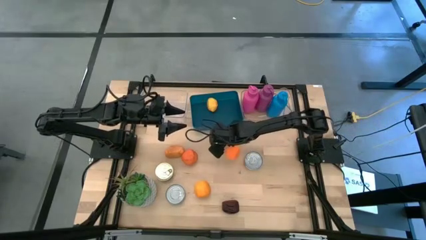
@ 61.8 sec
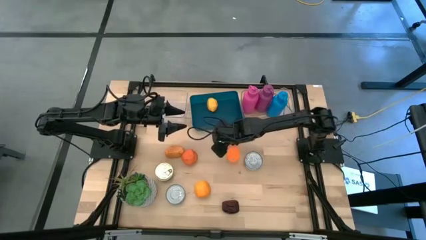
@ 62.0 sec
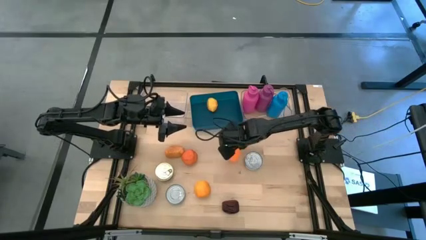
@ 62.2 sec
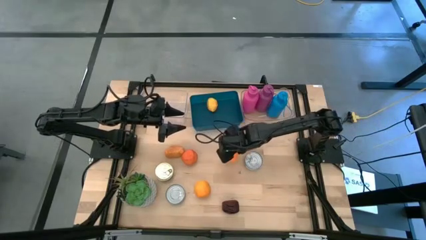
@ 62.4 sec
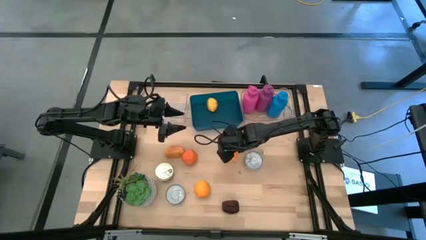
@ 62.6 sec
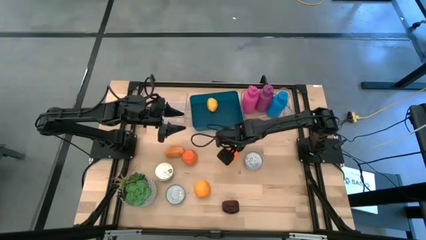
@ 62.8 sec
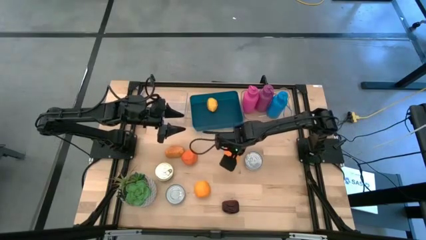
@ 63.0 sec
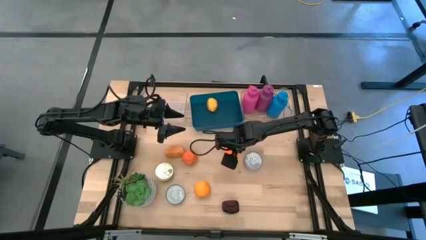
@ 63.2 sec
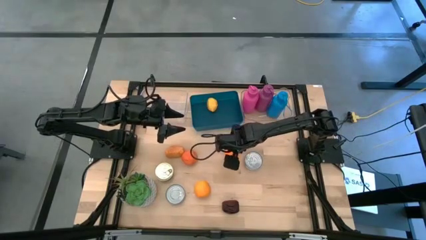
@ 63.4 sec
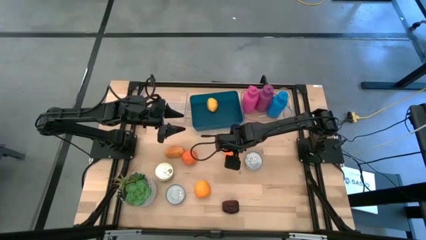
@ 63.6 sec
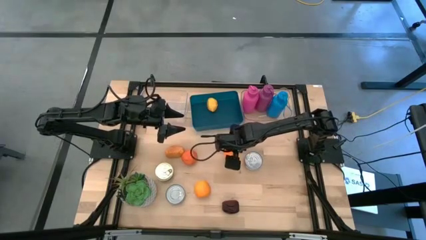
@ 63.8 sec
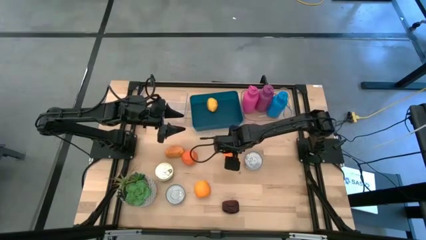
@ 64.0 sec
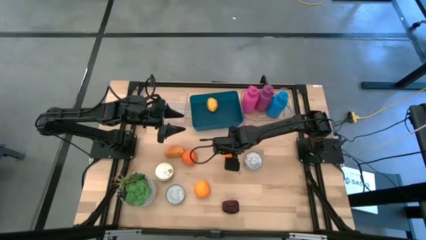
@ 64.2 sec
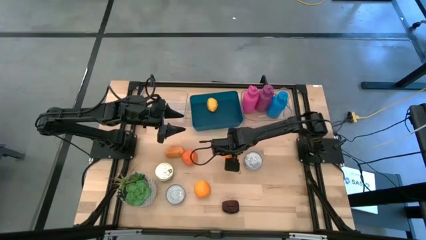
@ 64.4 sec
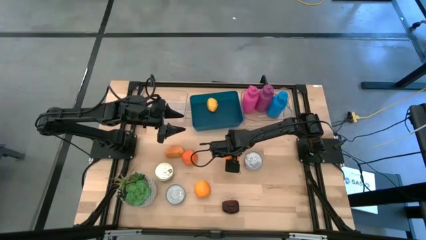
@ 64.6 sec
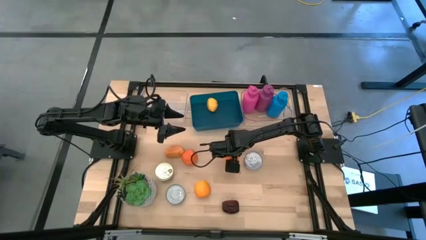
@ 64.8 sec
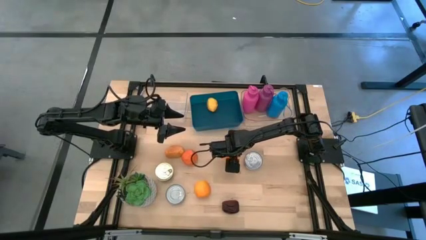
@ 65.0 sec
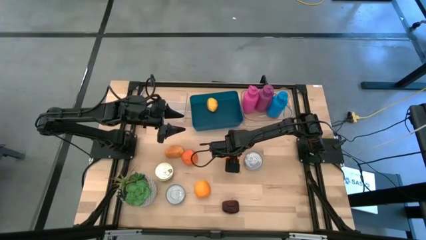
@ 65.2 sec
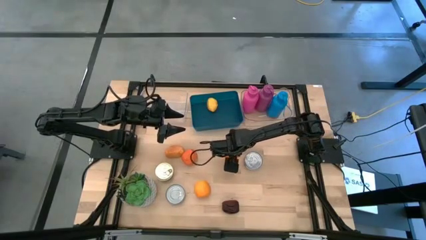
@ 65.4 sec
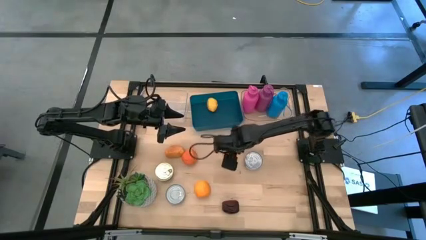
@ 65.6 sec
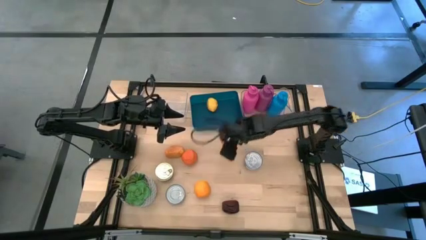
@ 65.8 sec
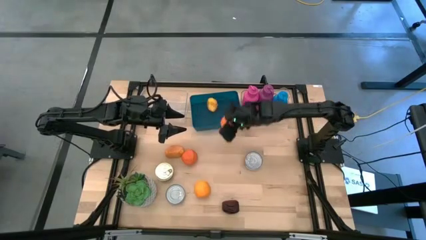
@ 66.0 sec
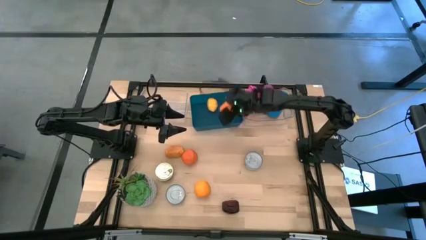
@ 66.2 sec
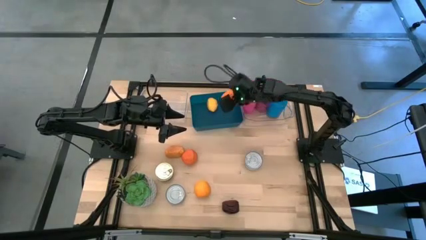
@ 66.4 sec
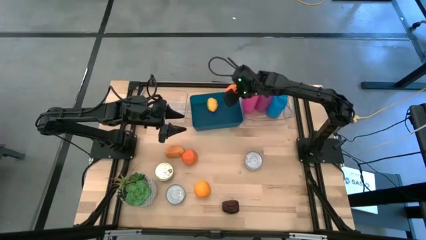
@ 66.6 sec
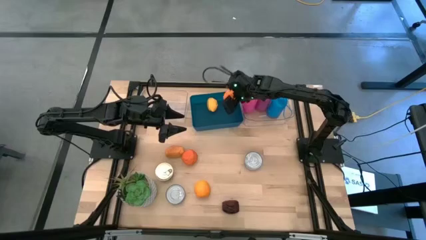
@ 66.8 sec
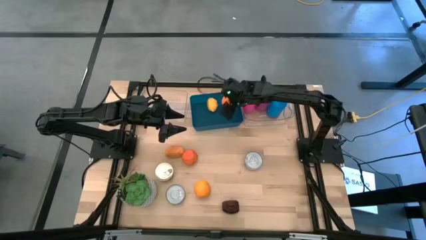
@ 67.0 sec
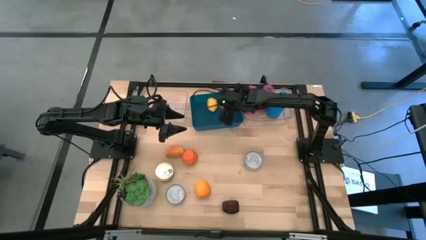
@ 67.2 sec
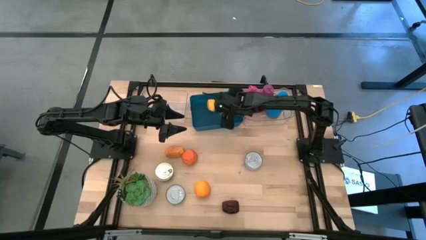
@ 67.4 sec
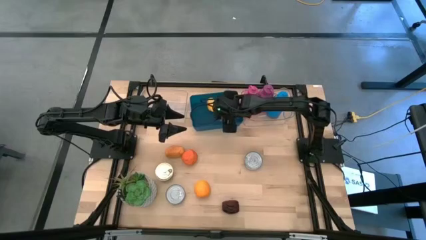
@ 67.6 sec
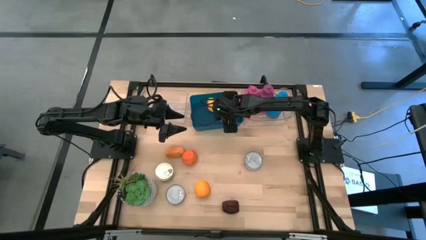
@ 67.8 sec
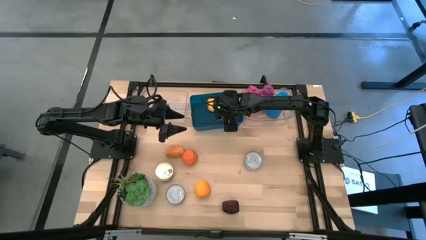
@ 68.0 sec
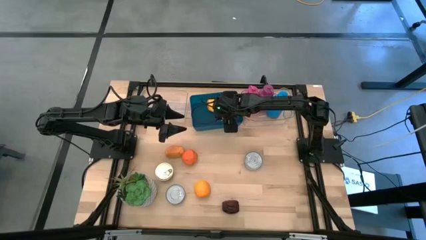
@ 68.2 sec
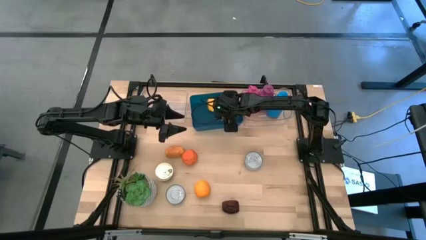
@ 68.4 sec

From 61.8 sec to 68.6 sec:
Task: Pick & Place Food Item
Put the right orange into the blue bin

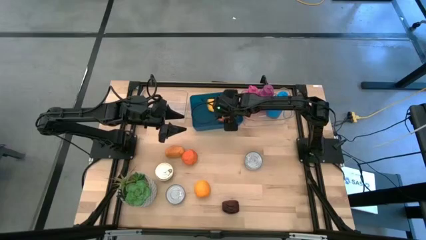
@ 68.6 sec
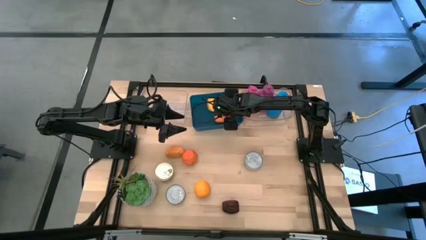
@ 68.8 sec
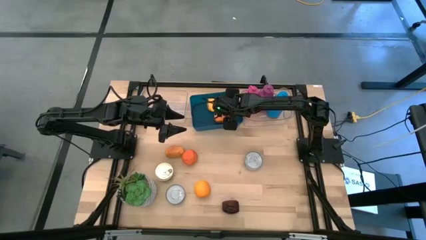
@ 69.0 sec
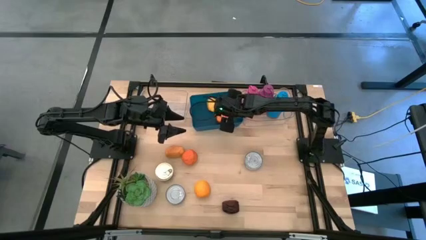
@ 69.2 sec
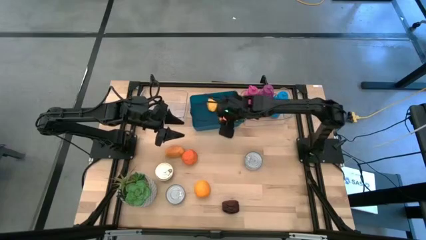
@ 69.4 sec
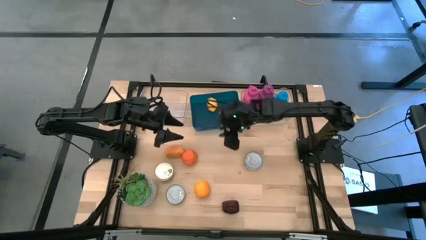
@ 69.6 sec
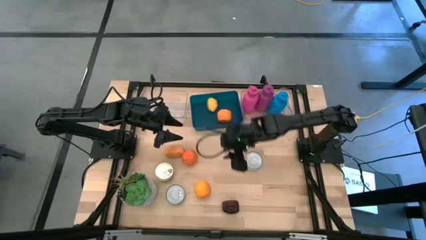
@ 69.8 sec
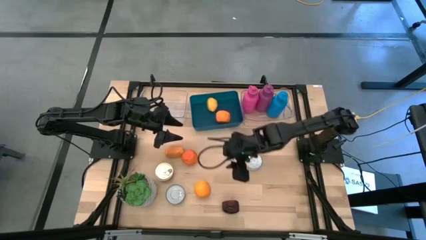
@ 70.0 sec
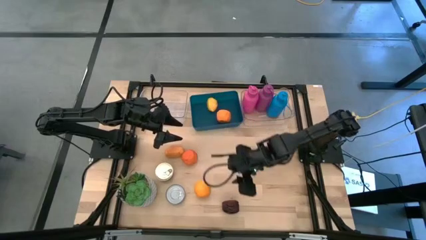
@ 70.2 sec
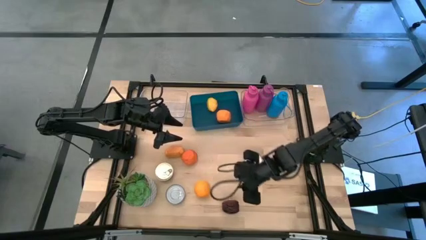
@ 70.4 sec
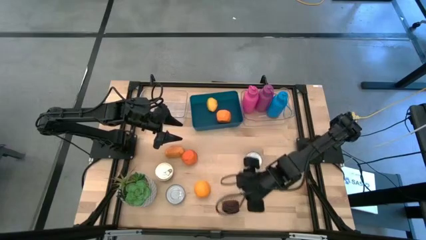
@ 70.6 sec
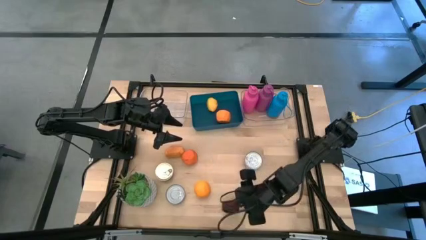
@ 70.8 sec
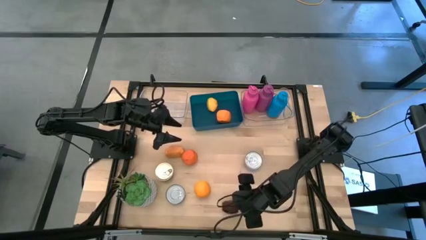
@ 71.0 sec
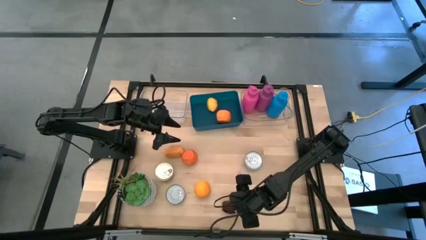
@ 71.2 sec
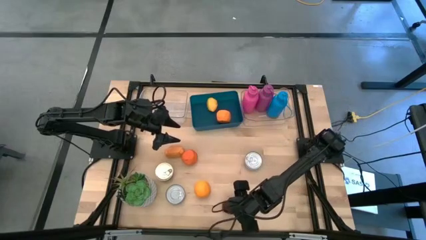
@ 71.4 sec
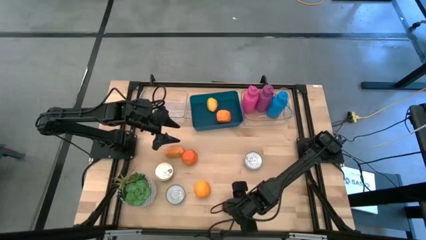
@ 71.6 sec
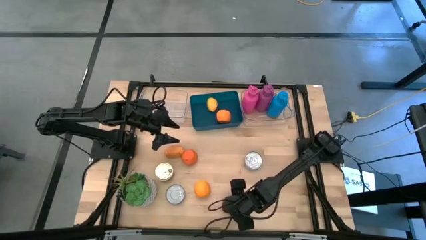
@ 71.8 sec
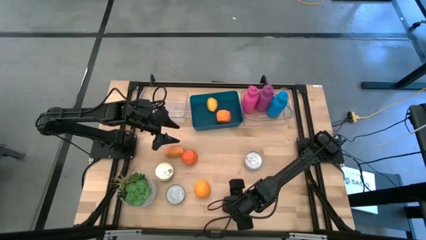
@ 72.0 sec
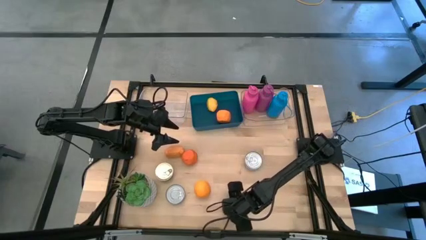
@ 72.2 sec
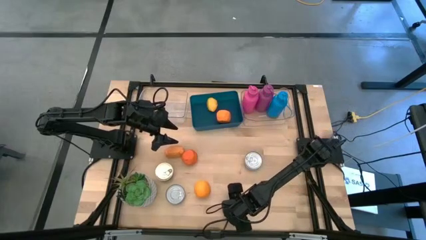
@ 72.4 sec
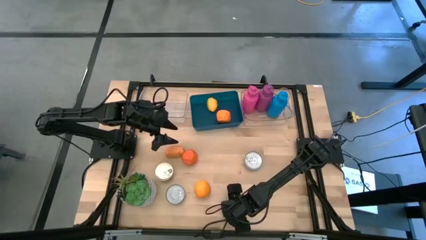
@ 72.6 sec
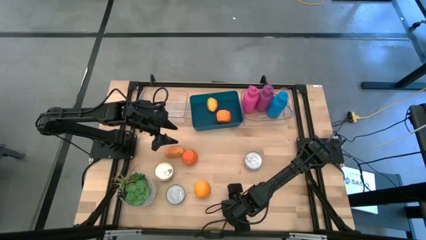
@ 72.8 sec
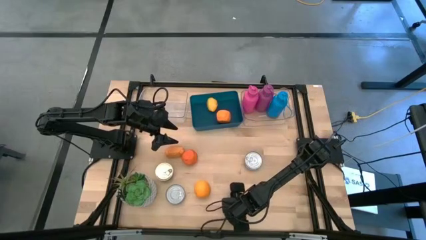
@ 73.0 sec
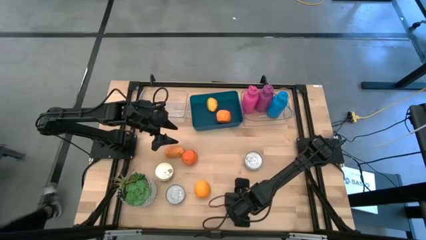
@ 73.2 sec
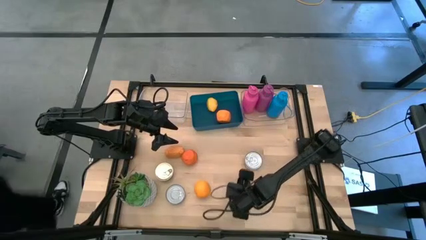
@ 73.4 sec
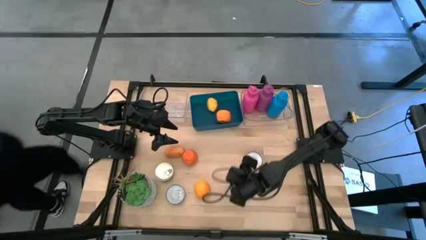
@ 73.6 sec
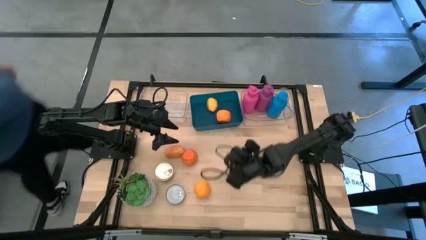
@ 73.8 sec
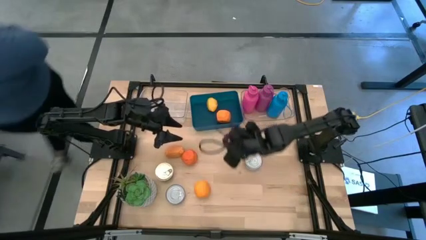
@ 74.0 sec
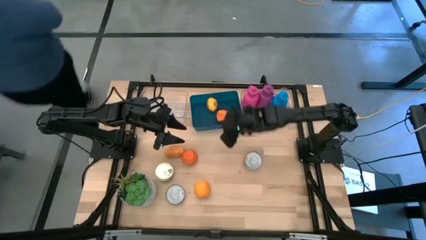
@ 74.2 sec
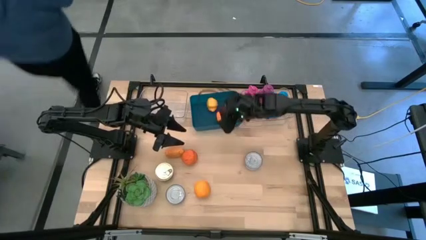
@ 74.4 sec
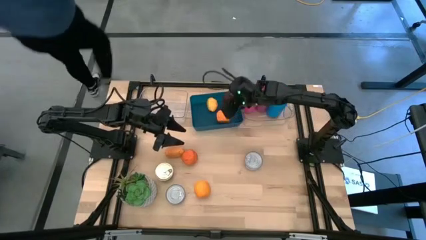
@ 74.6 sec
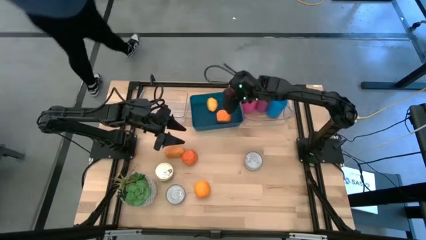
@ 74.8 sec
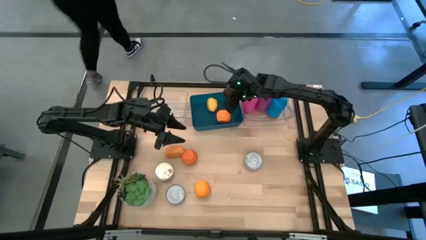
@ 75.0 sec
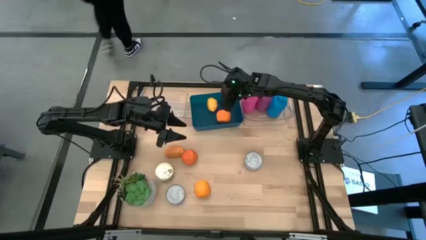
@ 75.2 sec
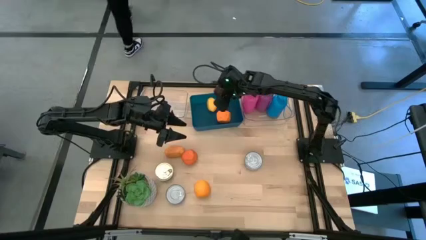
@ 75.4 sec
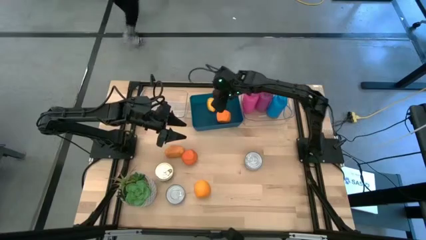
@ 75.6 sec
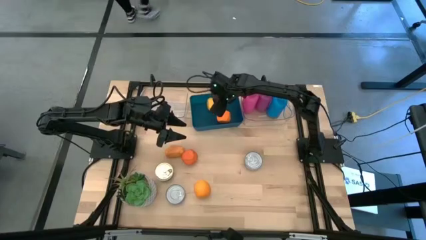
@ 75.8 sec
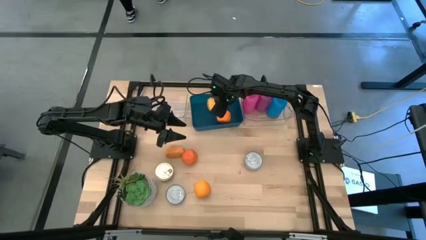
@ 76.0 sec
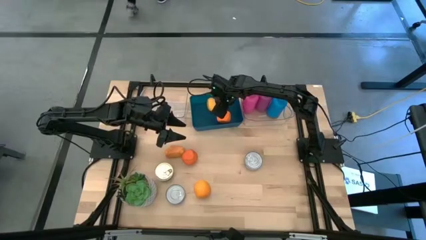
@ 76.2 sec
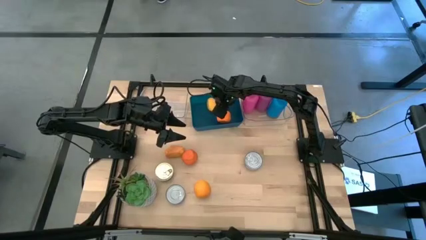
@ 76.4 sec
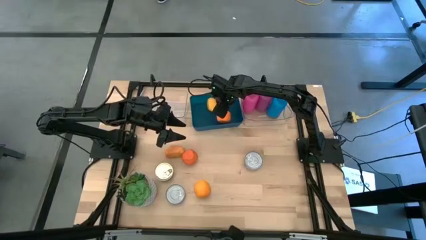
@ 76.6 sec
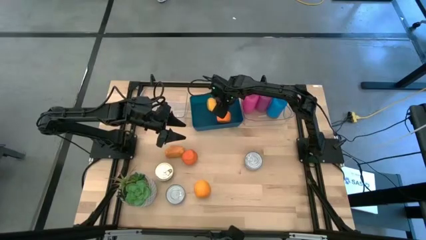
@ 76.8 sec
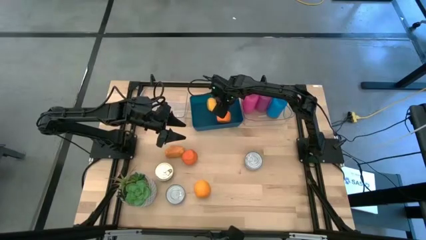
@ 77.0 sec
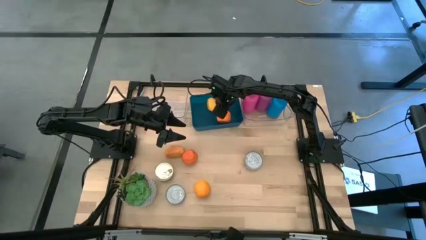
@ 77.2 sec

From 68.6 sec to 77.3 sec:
Put the apple into the blue bin
